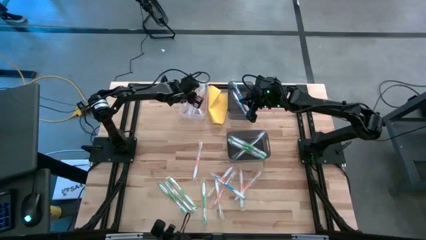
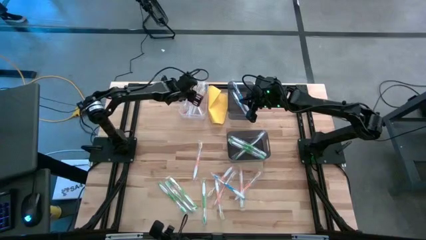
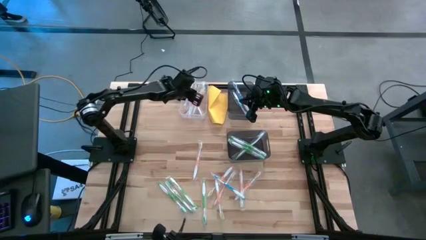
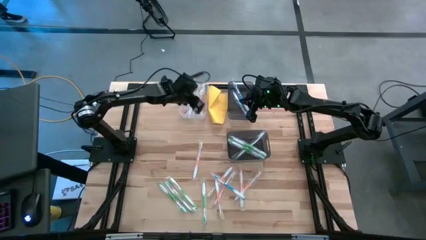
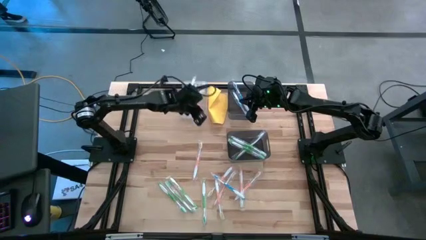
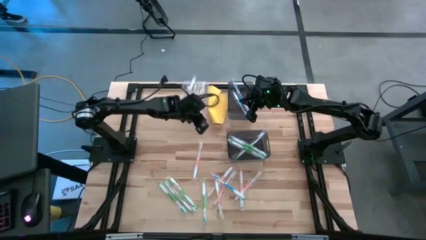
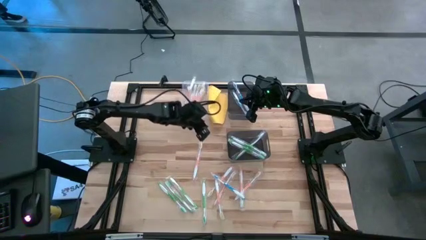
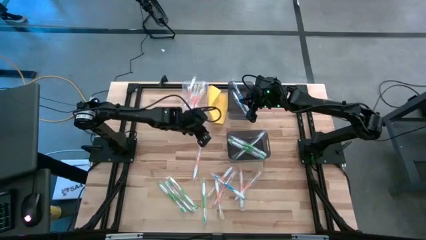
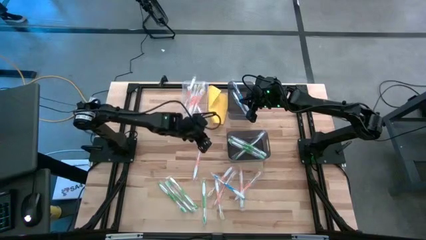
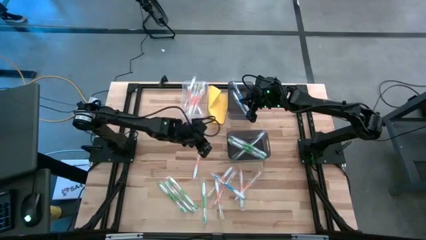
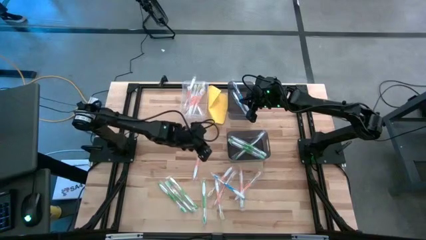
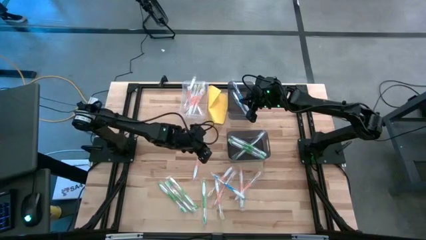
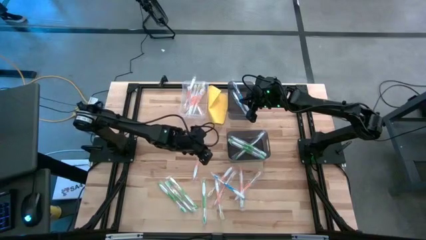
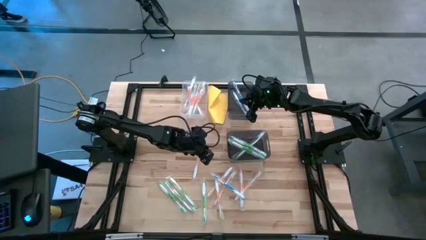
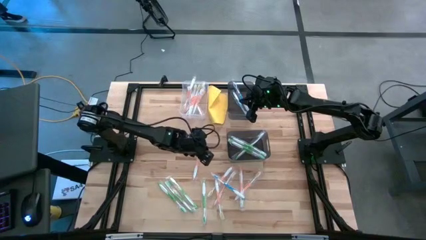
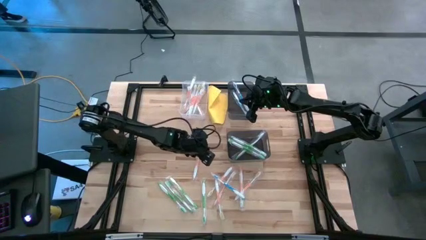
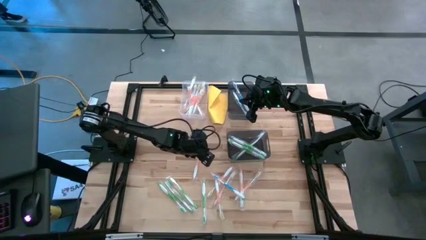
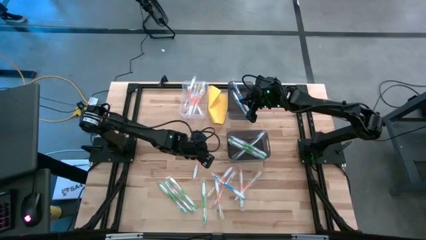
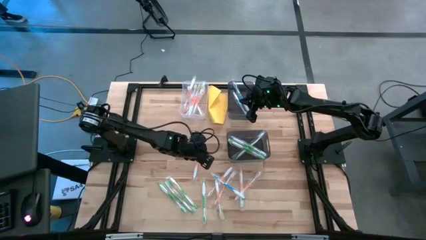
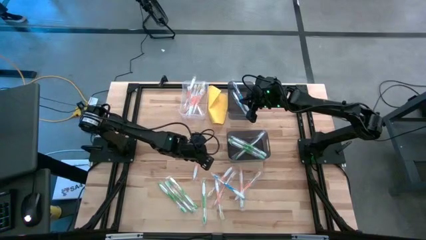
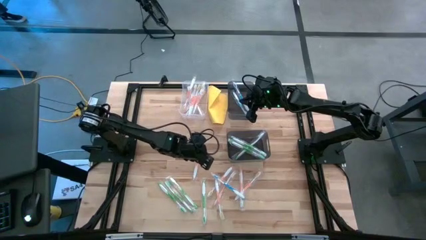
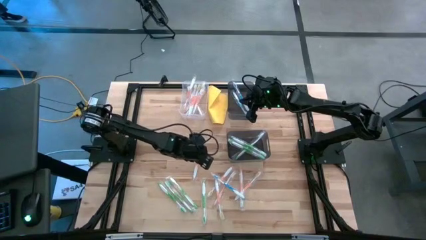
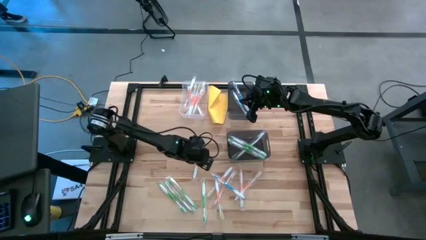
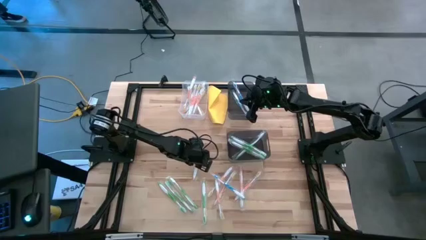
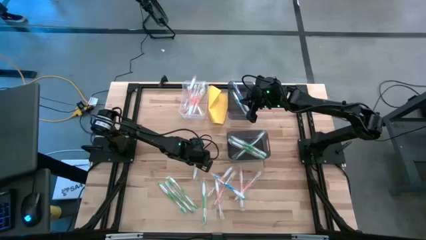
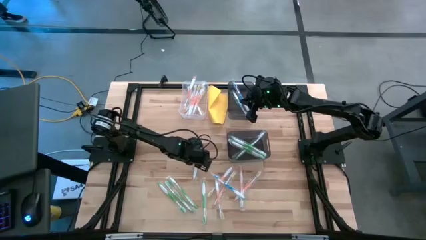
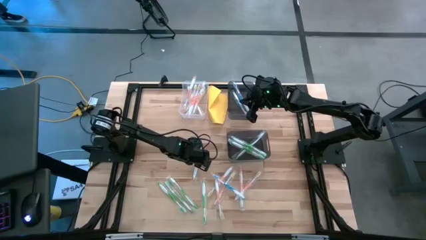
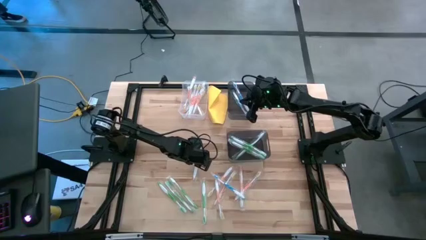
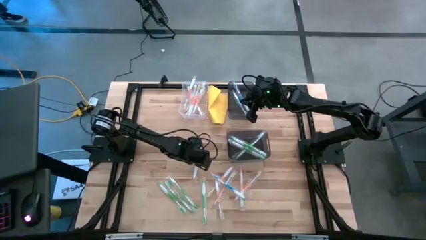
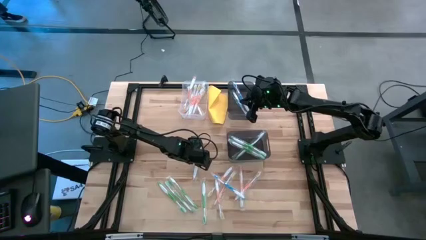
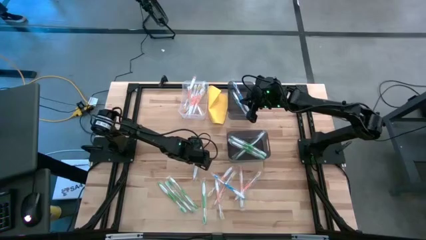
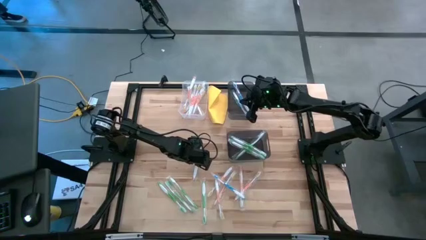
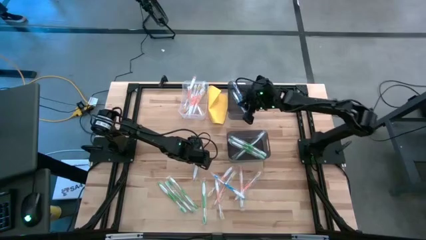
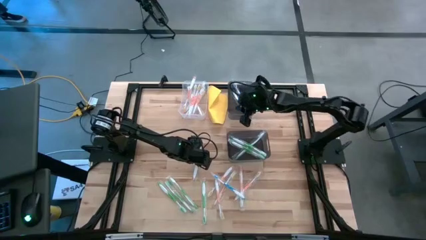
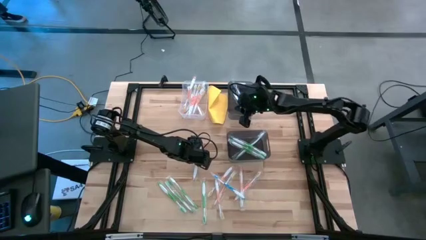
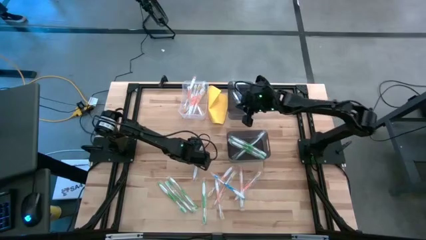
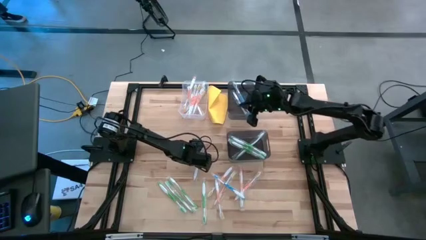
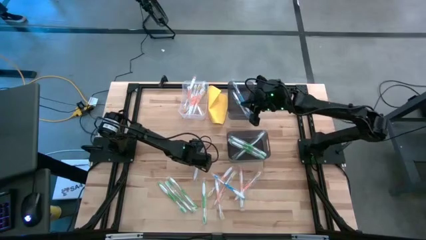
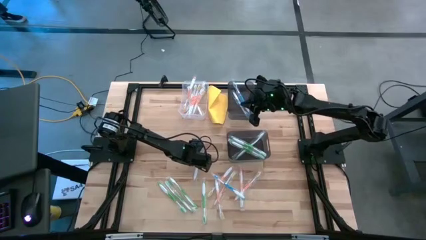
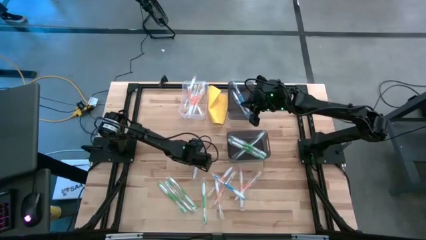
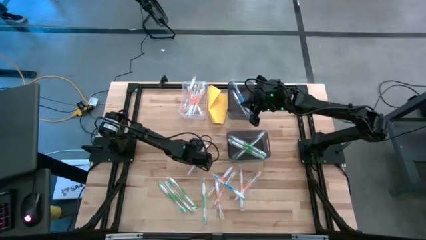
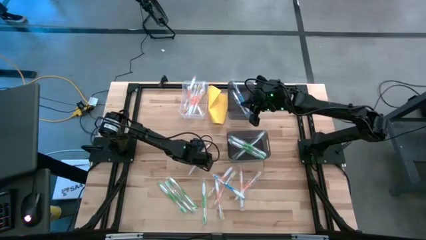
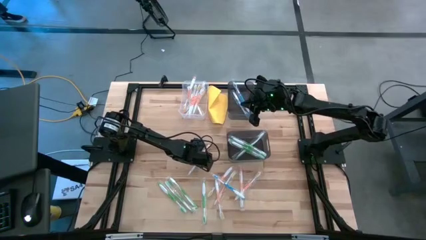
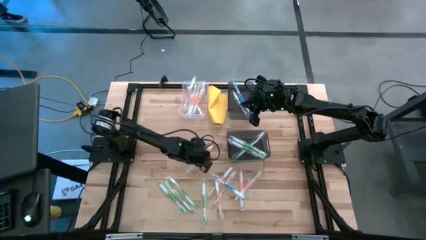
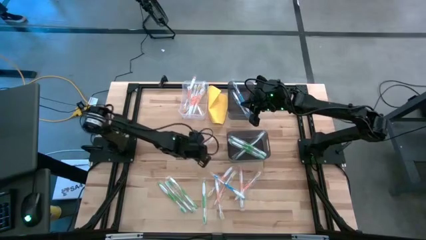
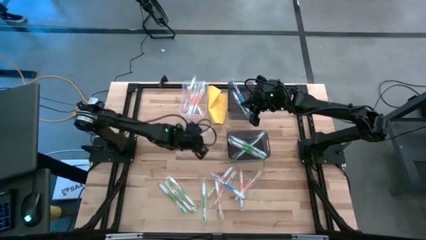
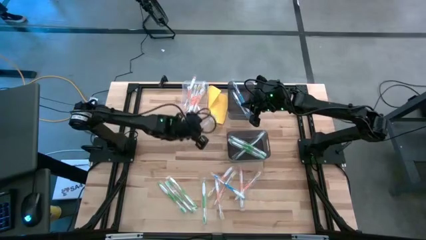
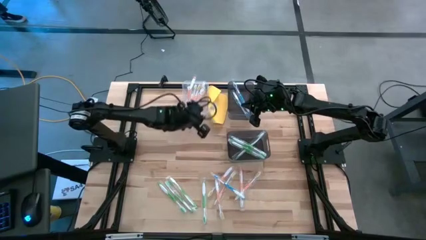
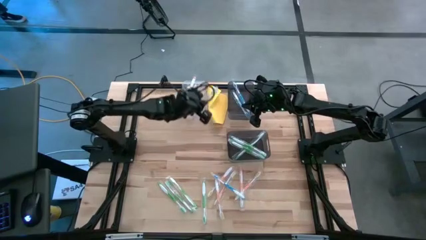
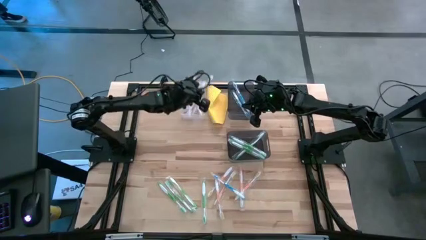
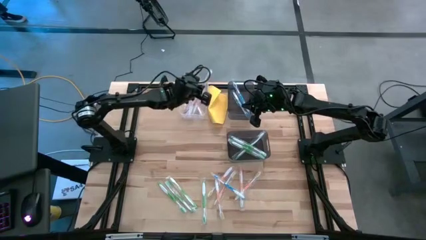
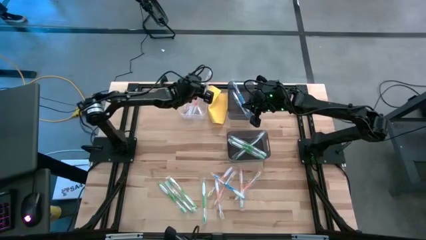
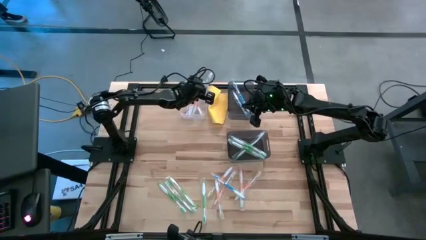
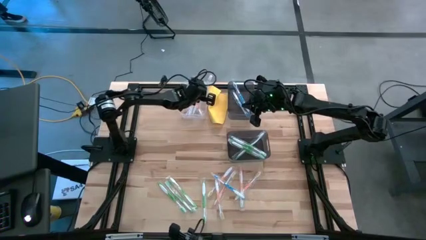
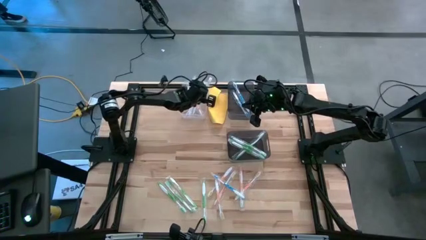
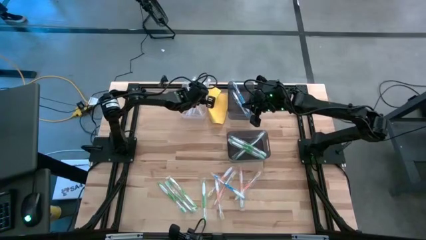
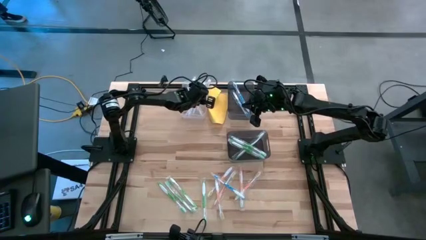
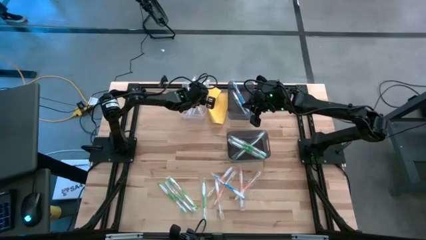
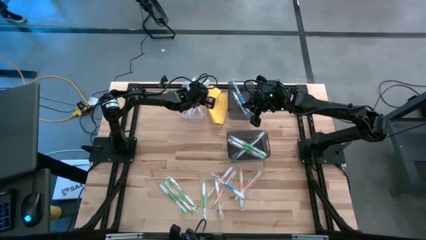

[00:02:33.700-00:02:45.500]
Task: Pick & Place Toothbrushes
Put the orange toothbrush into the transparent bin

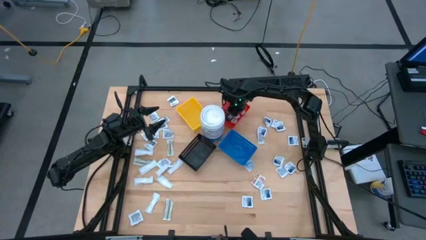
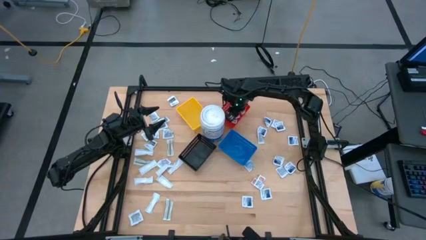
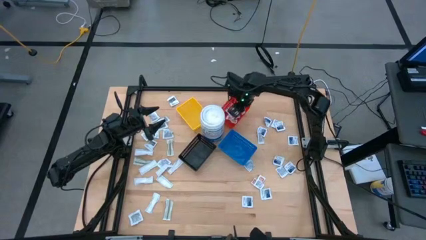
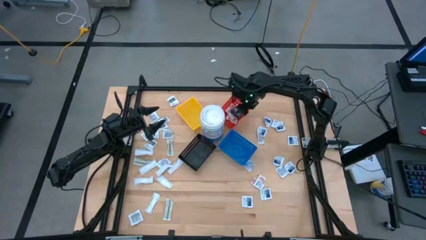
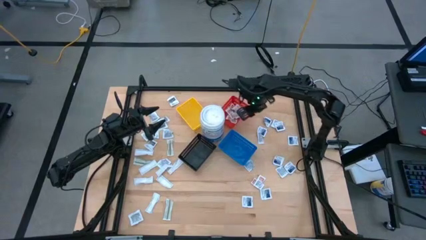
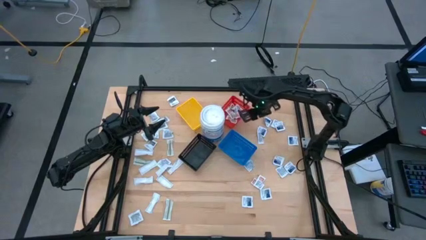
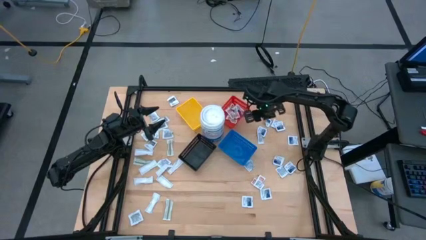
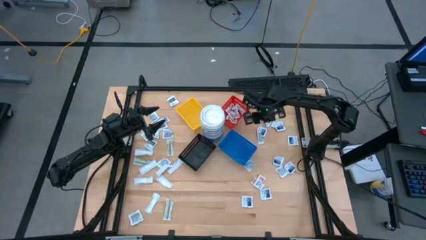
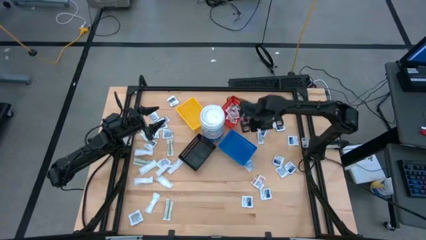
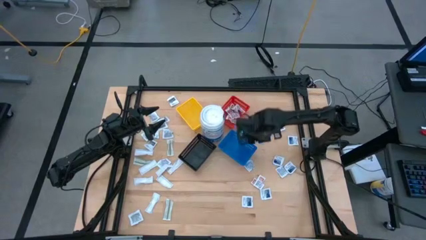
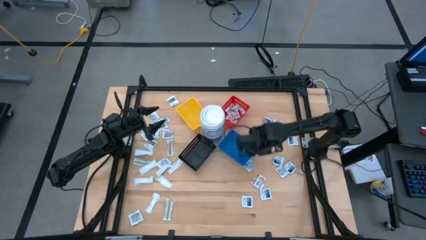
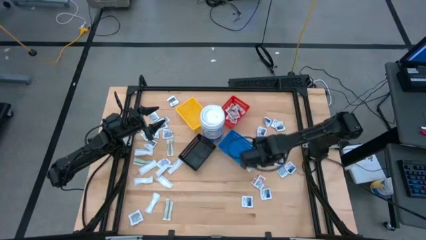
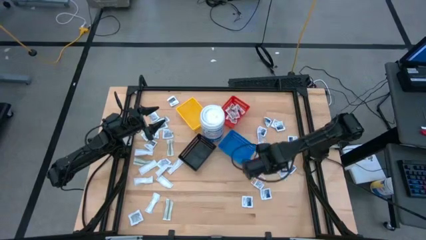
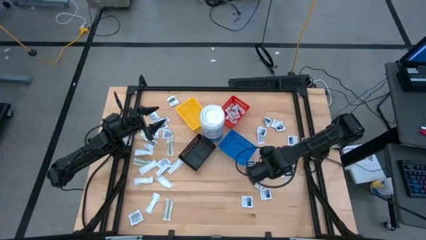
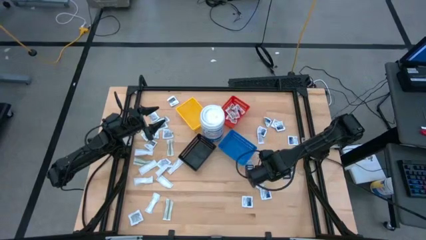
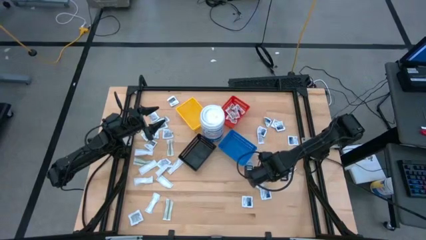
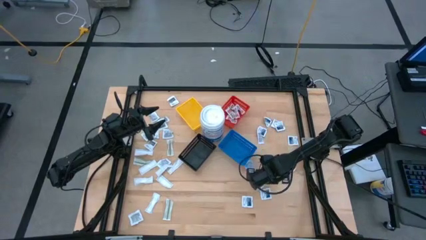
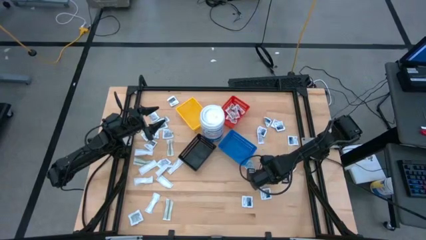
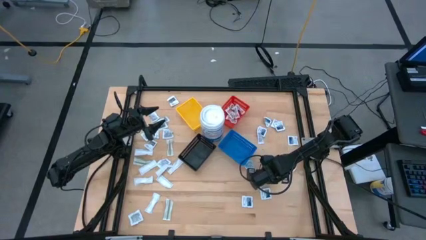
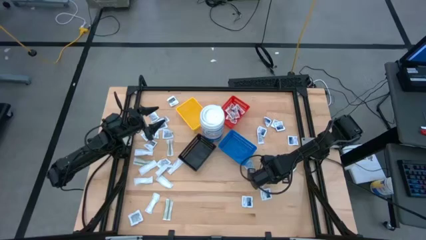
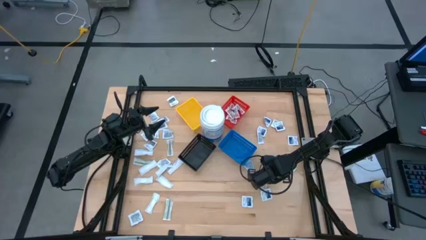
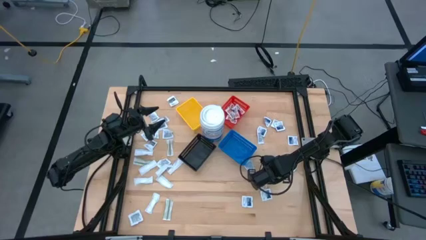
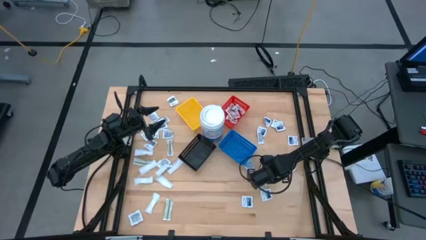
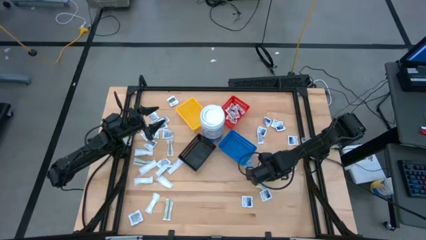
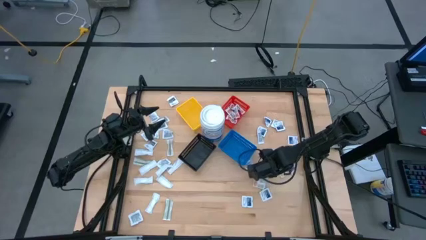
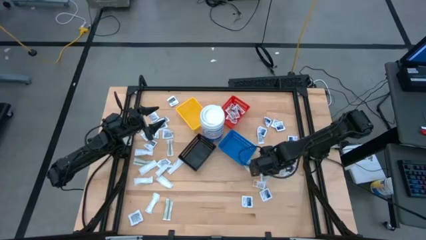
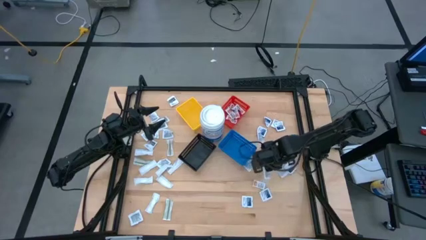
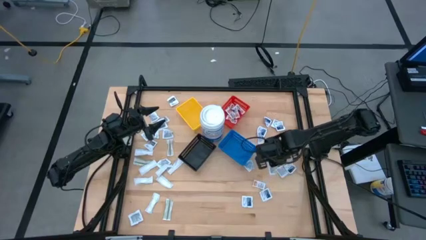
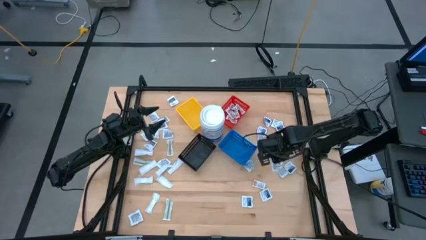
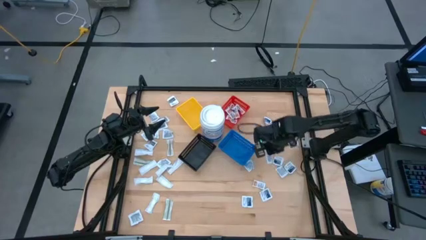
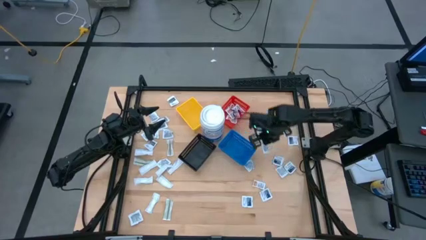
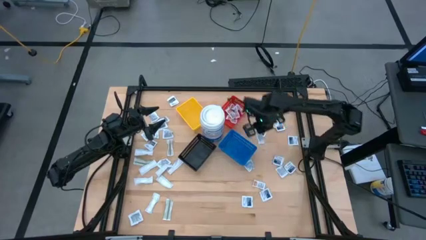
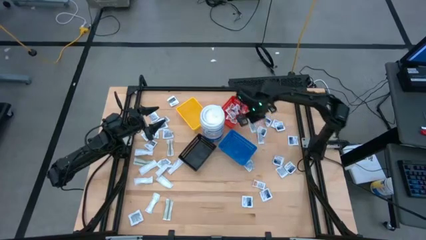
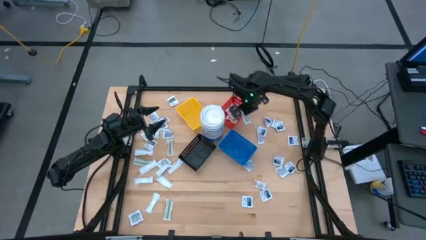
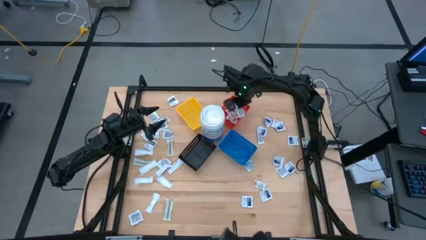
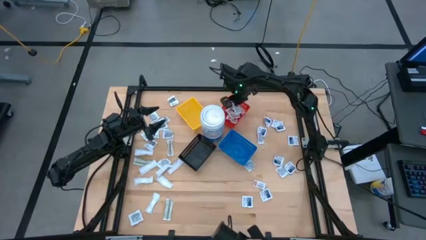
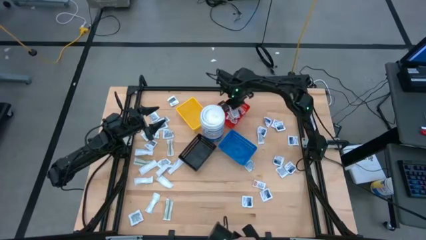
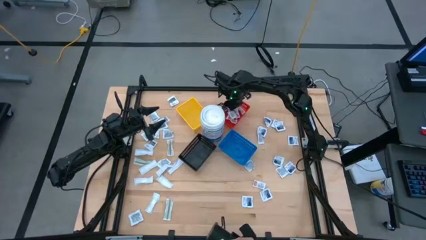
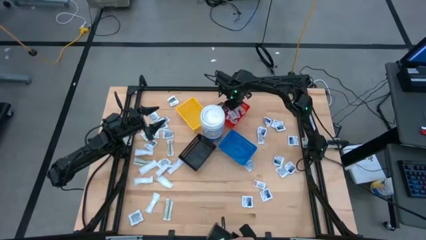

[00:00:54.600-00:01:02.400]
Task: Pick & Place First Aid Supplies
Put the ointment pack into the red bin
